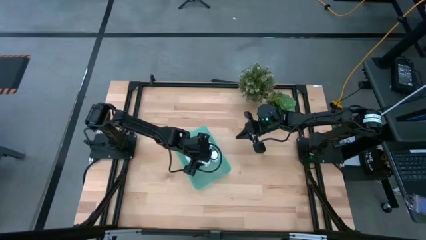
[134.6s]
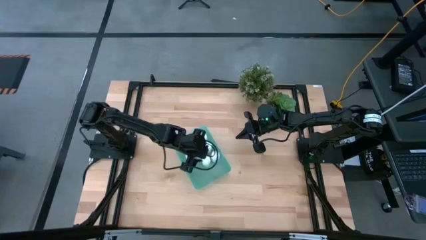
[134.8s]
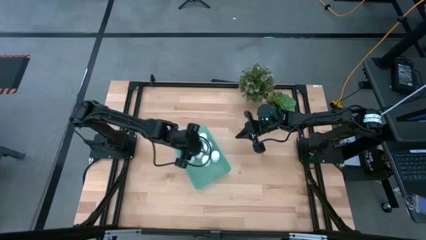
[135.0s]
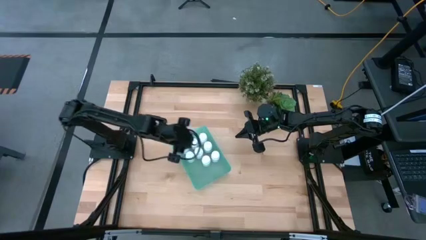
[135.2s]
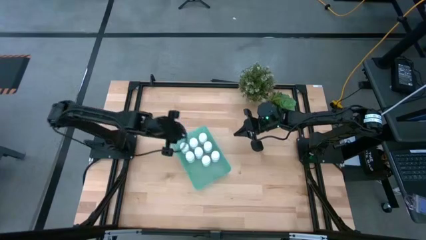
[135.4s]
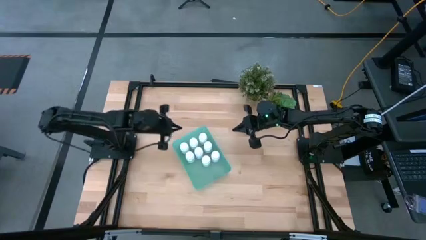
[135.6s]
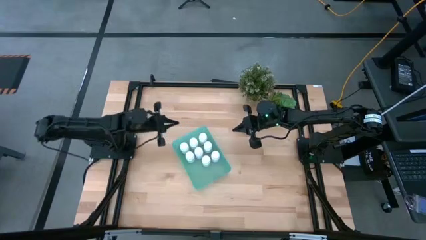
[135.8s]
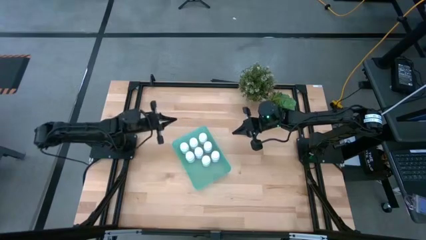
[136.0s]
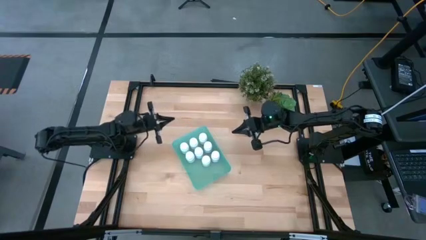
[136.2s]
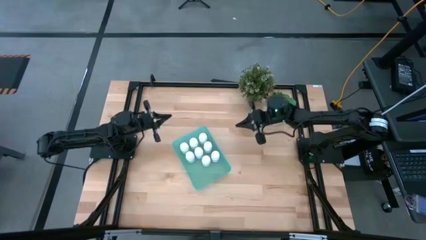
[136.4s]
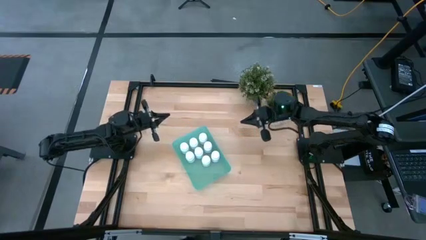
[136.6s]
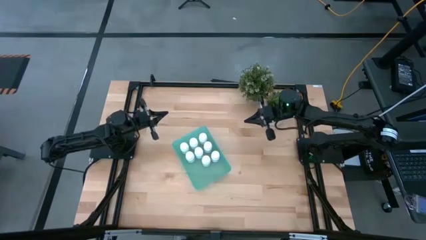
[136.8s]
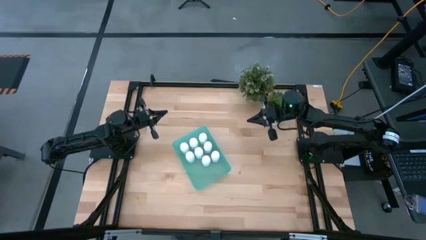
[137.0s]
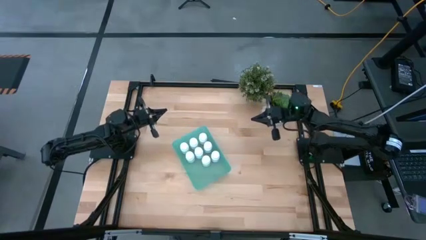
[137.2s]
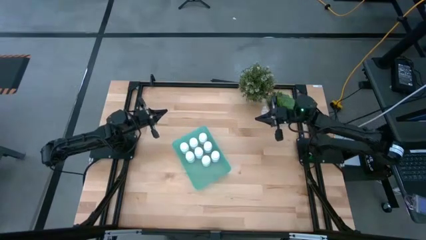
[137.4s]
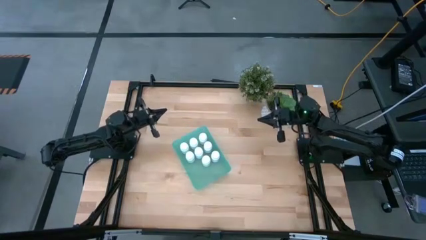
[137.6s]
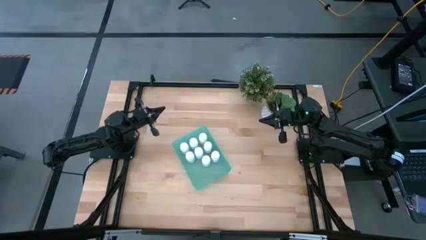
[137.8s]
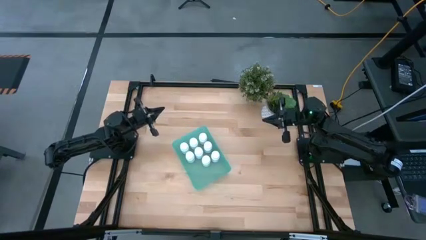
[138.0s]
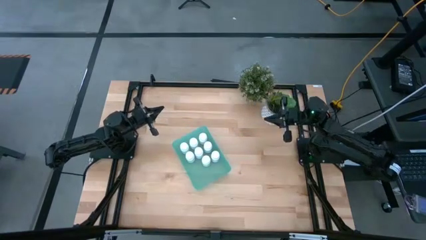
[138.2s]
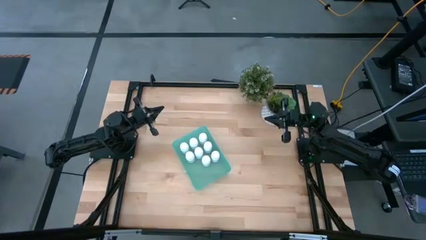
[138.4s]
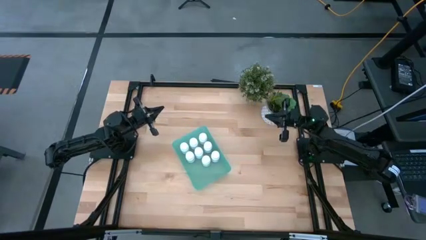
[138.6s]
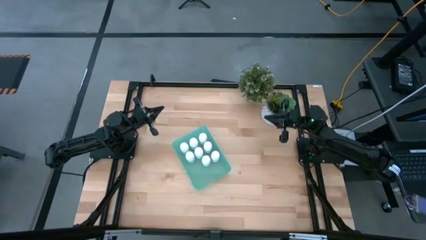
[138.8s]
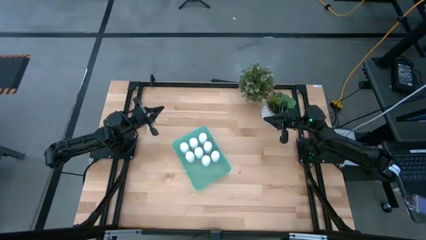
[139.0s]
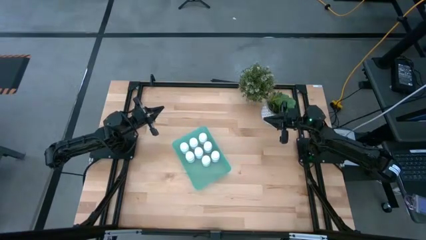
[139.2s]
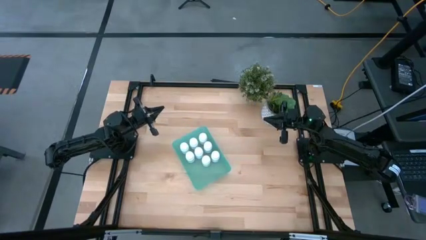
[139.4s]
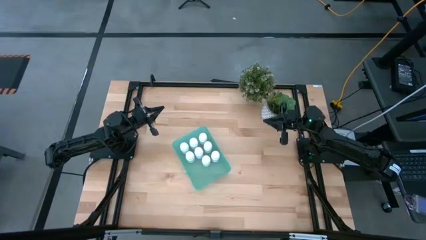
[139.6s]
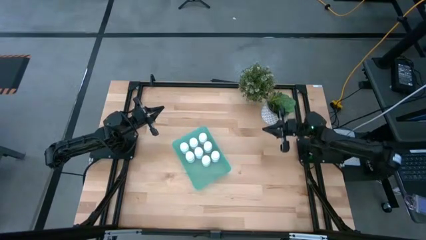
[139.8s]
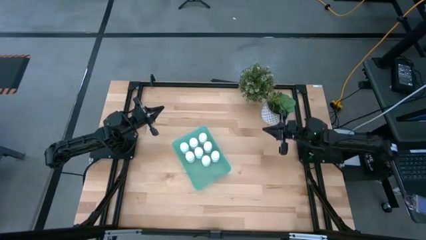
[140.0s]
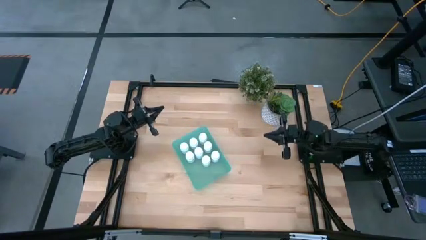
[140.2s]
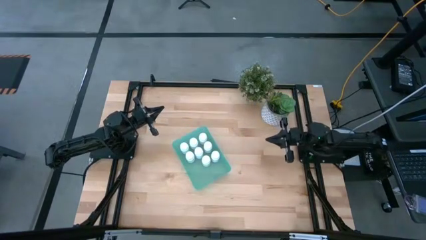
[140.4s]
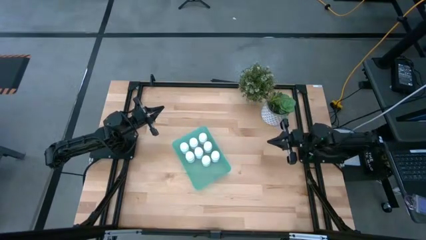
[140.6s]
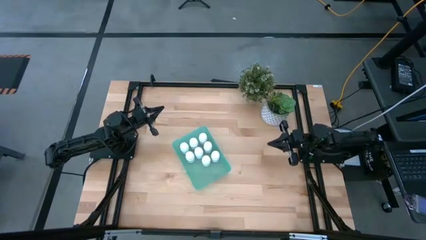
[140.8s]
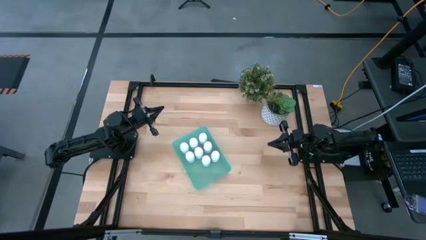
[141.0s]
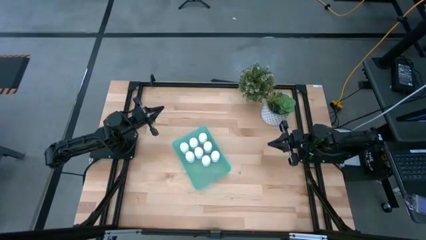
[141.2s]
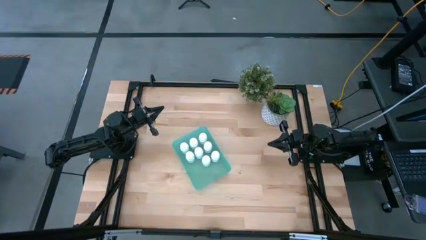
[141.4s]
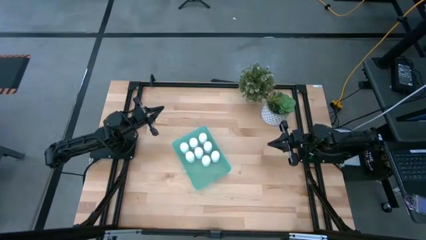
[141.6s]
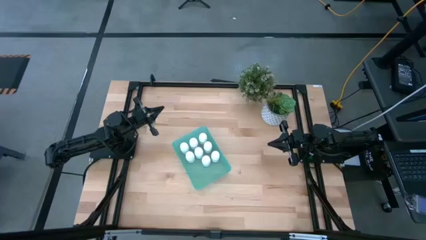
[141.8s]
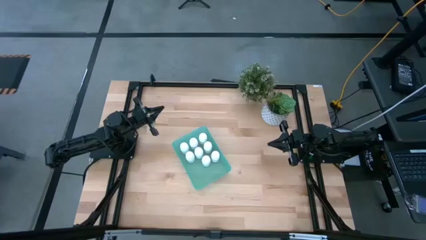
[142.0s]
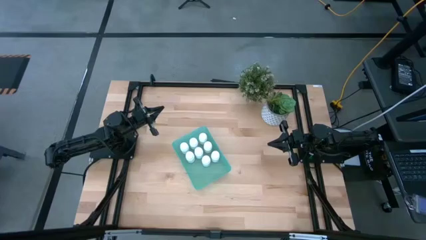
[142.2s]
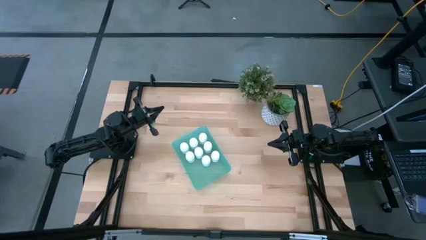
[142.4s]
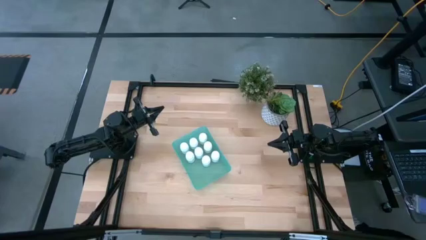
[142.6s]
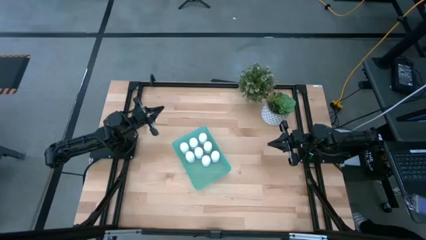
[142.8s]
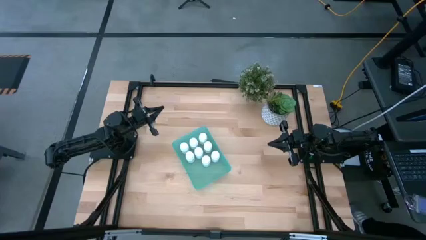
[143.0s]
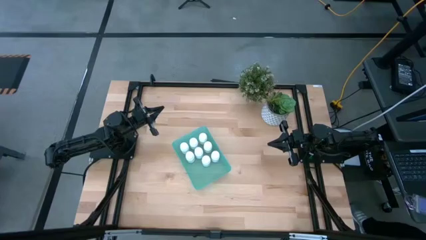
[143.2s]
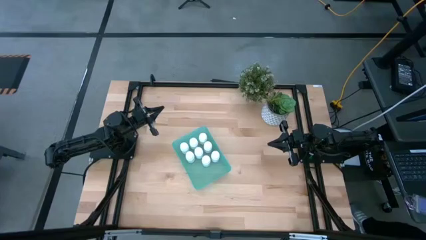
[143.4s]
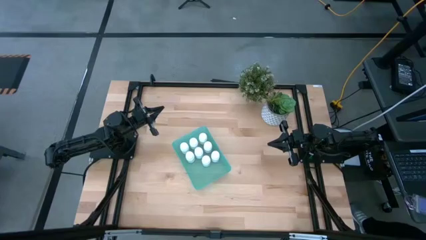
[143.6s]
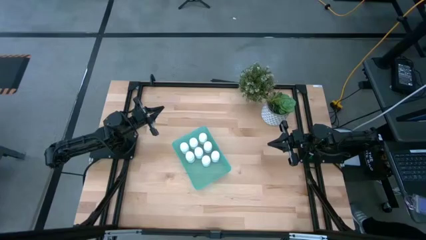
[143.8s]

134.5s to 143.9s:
Task: Pick and place pill bottles into a basket
Return to Home Position

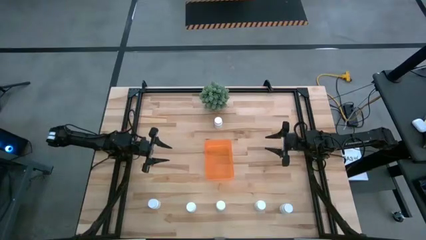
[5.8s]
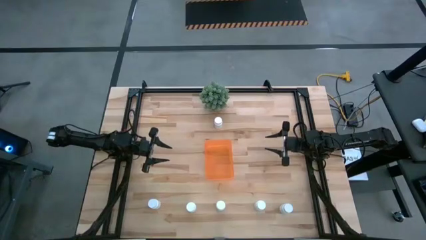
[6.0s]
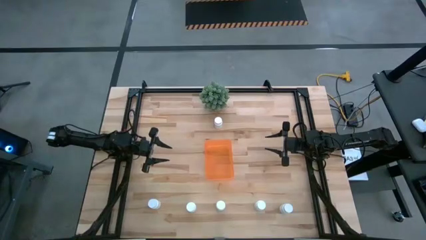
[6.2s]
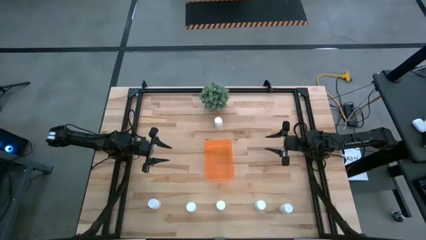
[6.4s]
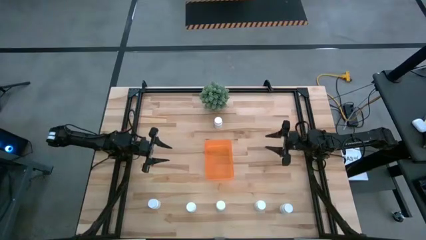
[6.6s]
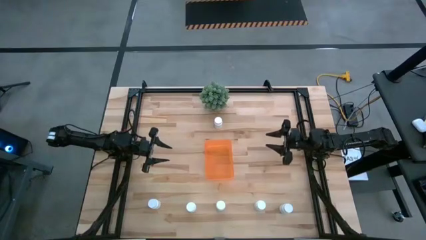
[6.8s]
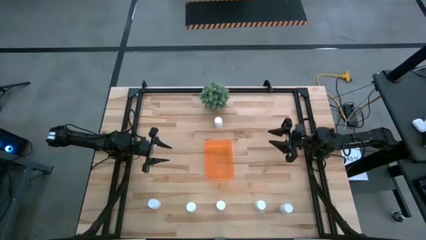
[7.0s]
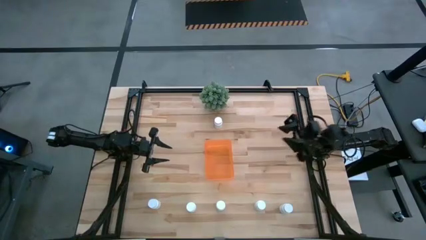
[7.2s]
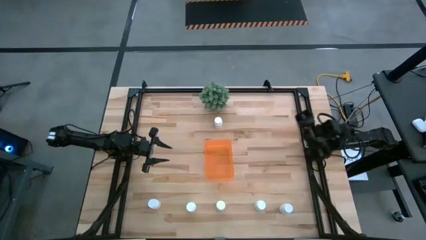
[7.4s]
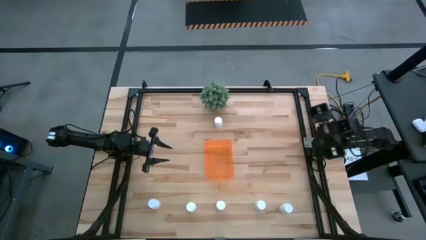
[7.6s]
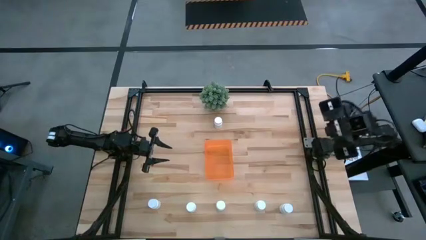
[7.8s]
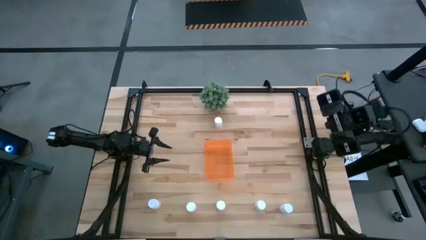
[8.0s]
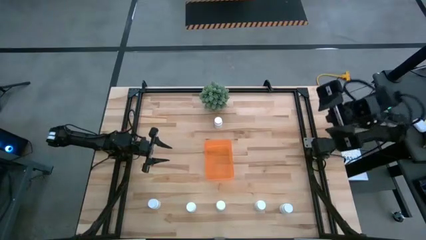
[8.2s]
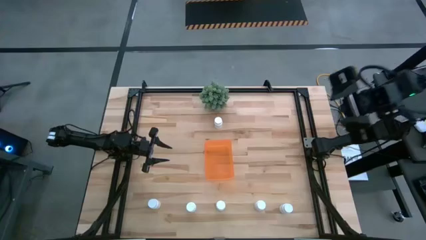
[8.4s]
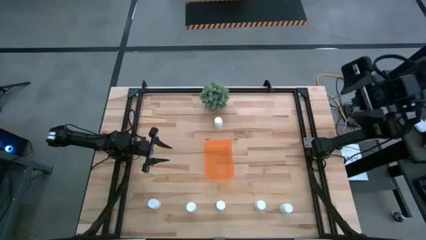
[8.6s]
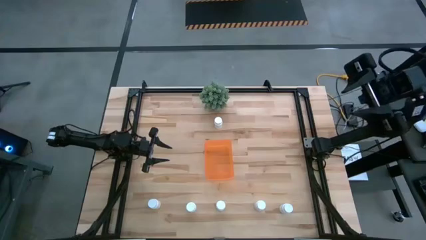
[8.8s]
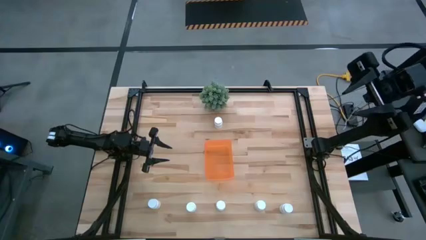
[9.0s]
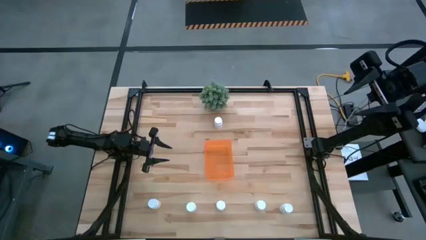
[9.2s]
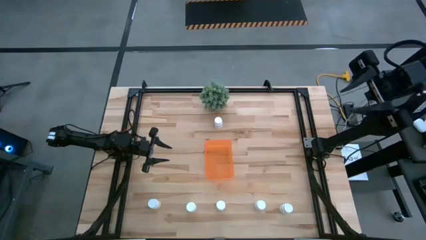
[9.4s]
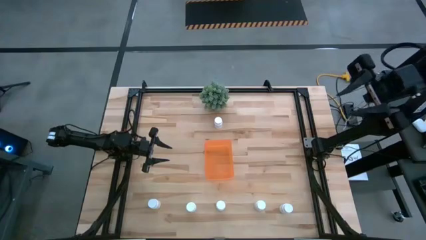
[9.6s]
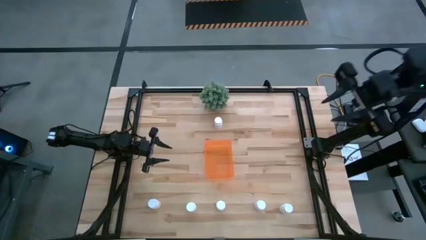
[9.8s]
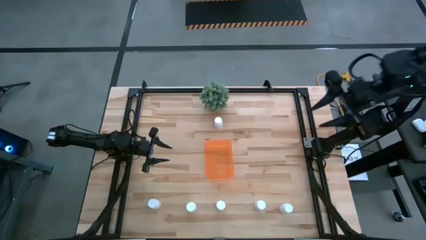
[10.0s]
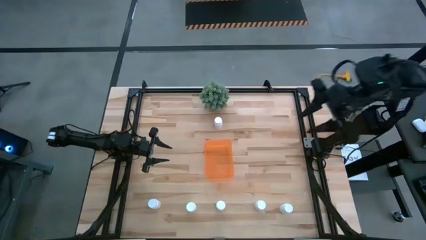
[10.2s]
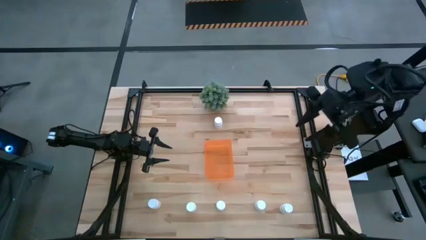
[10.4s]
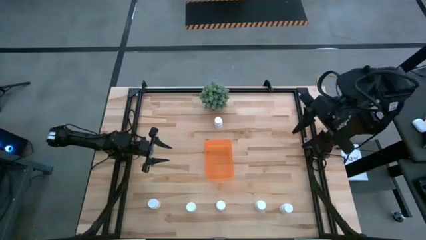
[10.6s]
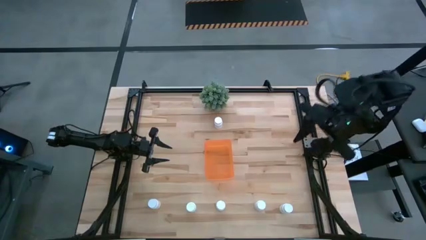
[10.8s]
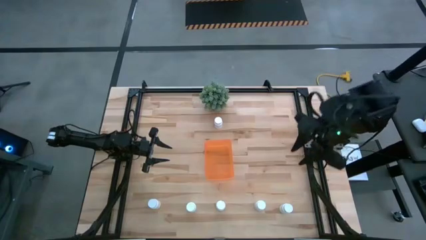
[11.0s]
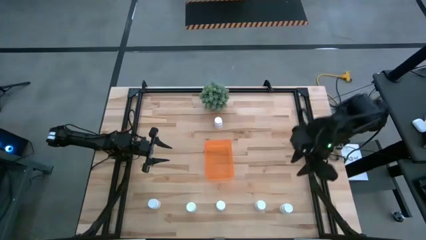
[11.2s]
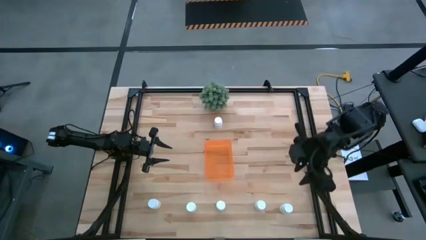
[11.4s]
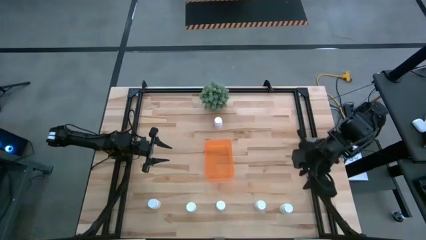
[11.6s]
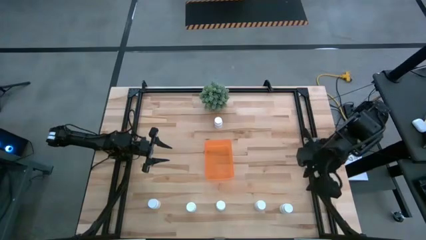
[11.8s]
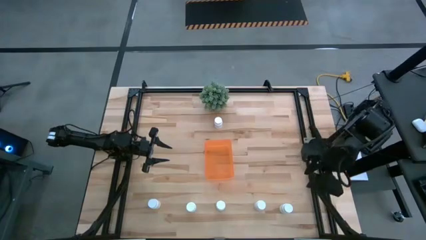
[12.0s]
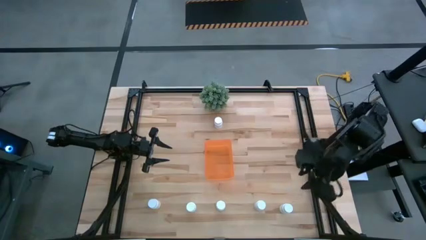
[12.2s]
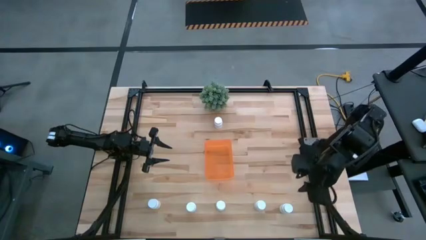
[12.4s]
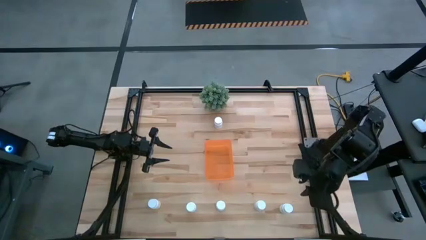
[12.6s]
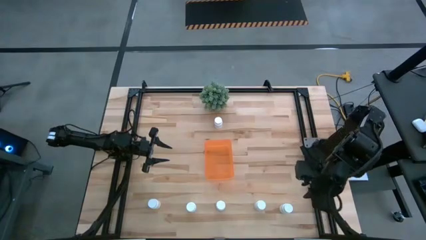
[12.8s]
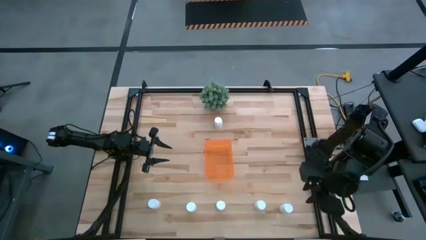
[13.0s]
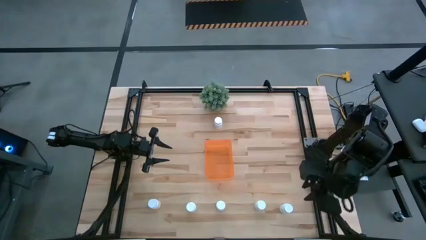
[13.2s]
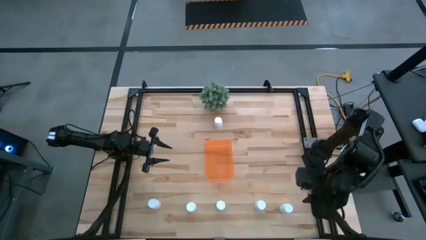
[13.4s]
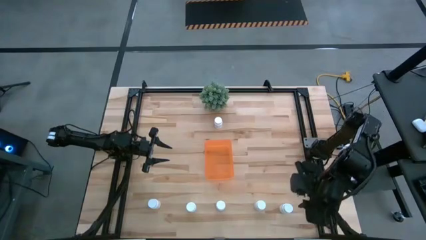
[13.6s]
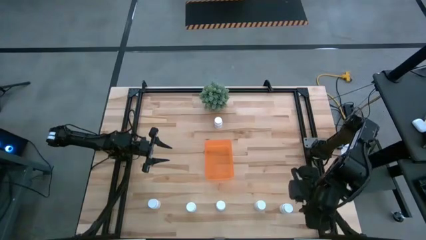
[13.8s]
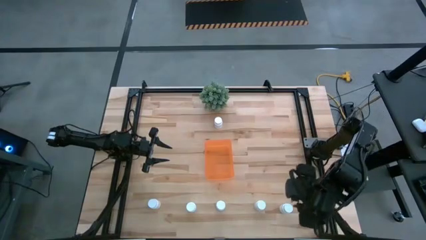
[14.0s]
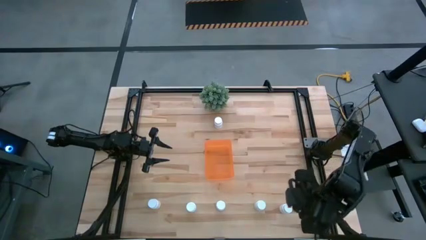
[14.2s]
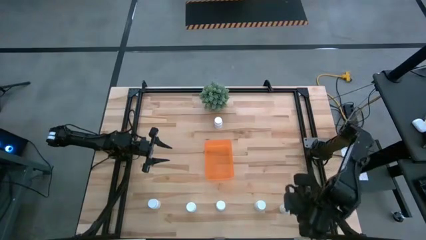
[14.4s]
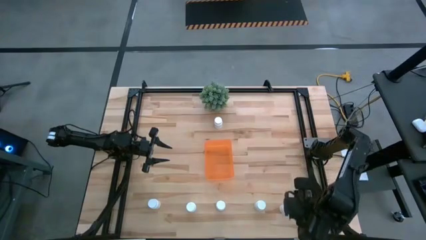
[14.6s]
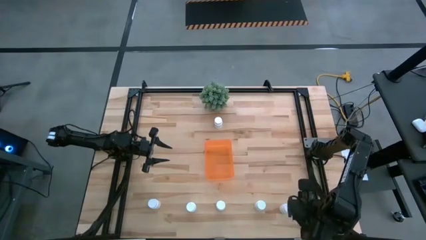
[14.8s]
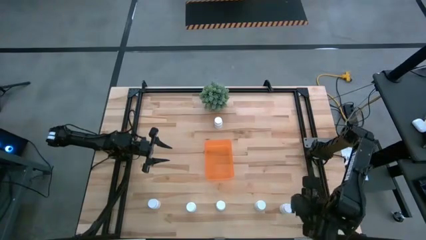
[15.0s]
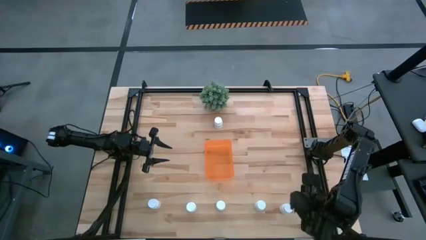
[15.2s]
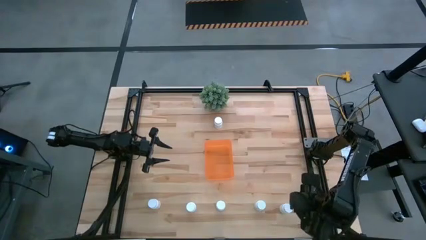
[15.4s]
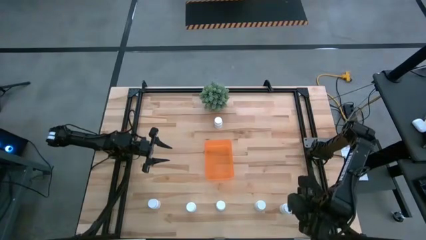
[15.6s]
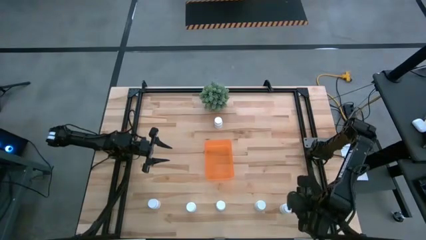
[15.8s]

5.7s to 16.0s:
Task: Pick and place pill bottles into a basket
Put the white pill bottle into the orange bin
